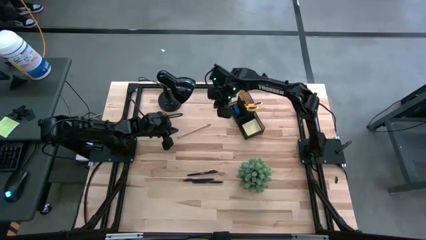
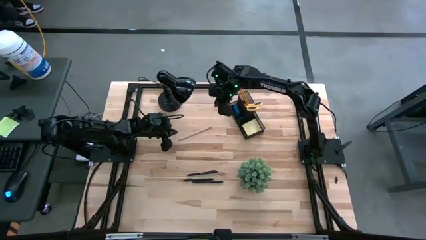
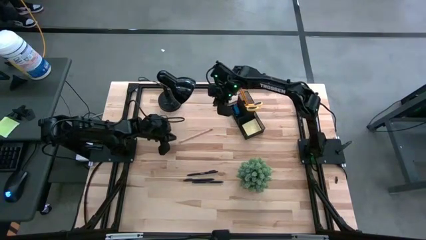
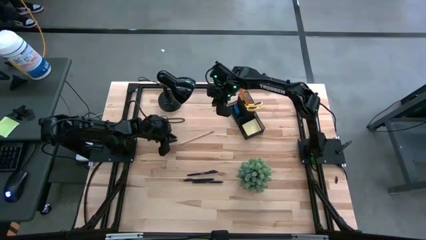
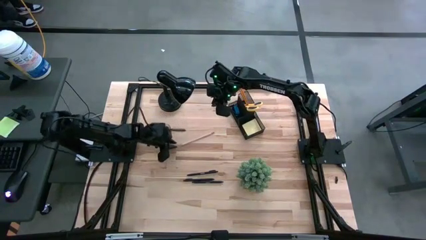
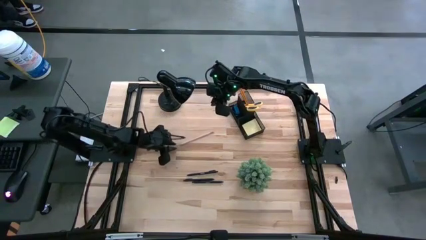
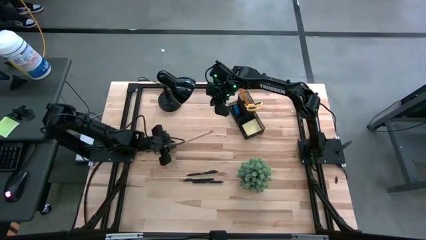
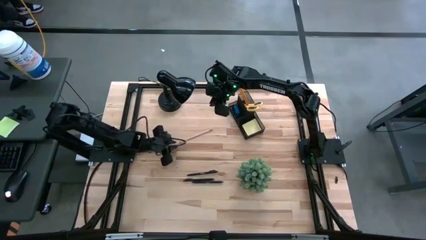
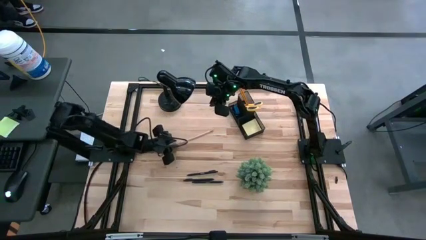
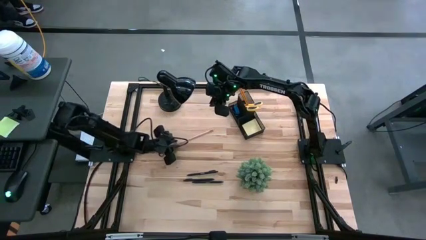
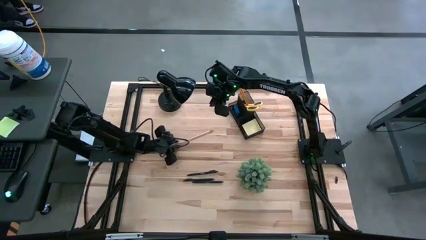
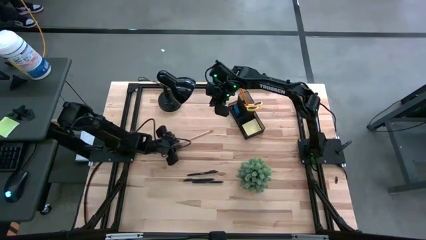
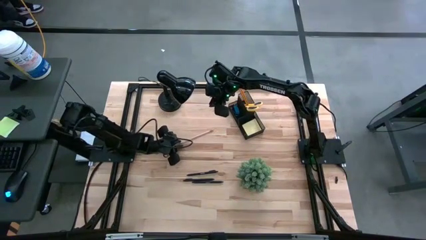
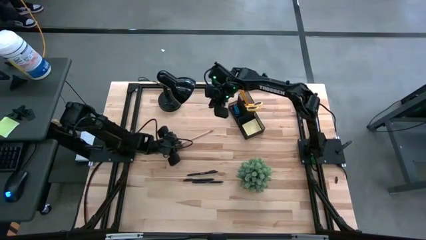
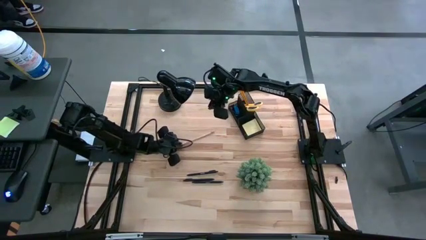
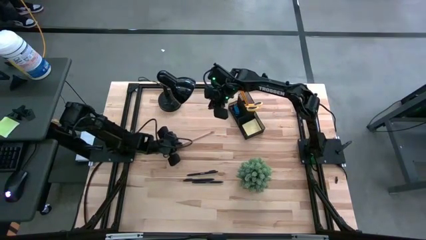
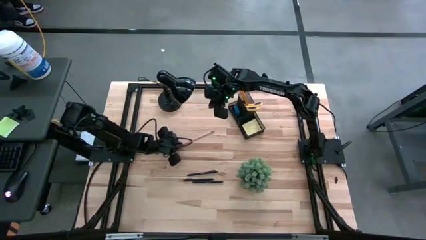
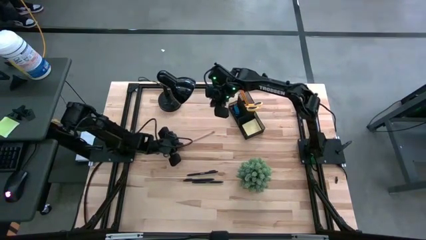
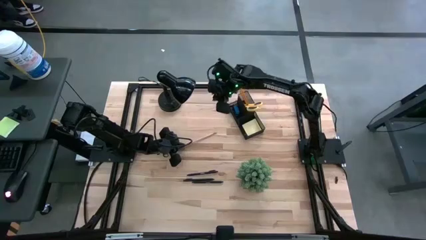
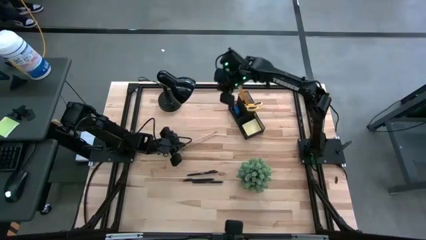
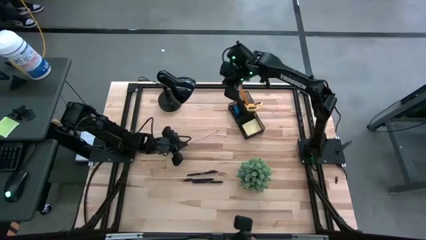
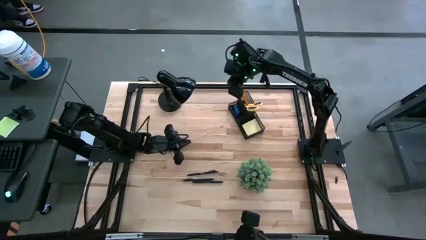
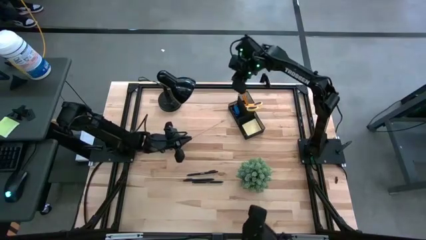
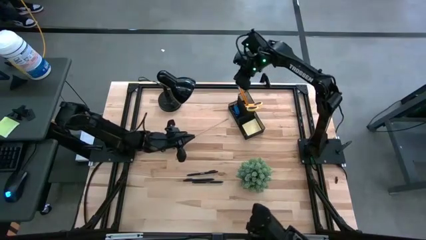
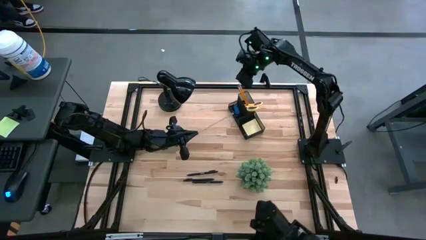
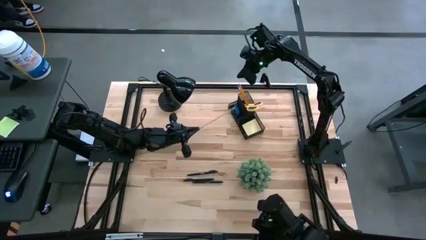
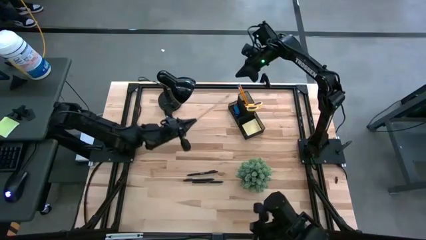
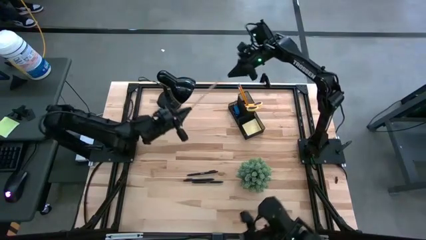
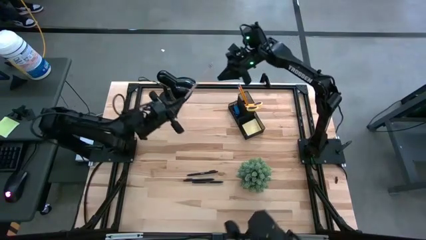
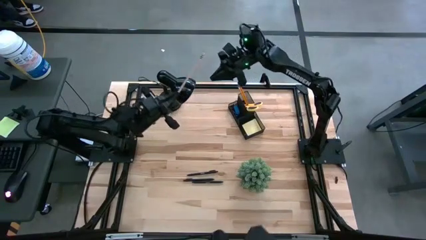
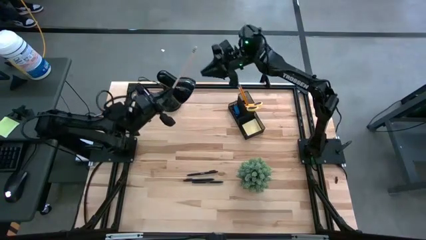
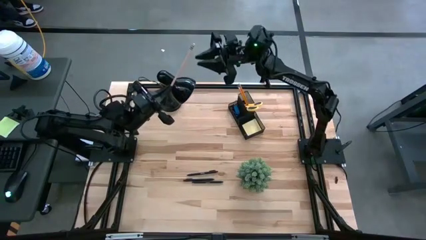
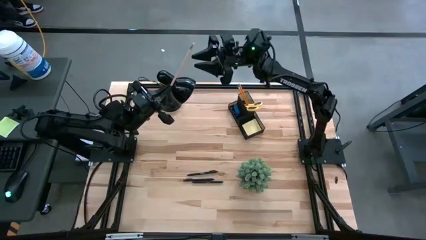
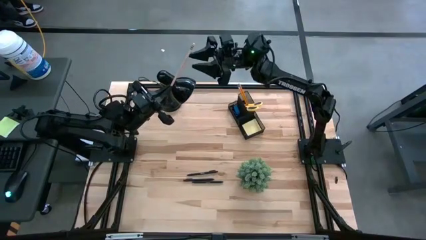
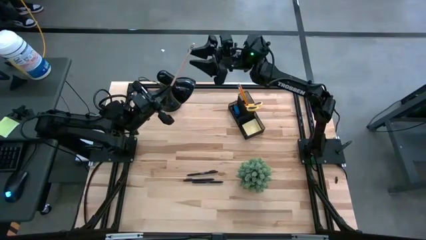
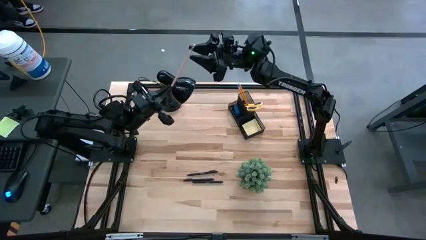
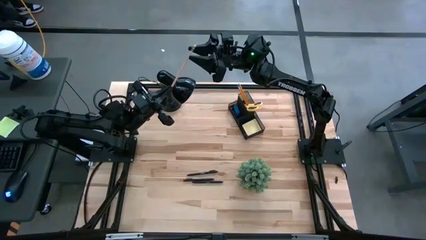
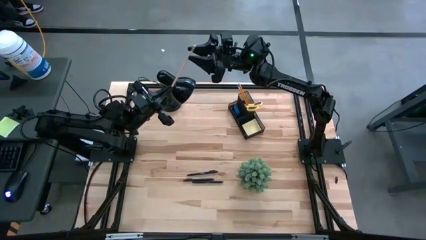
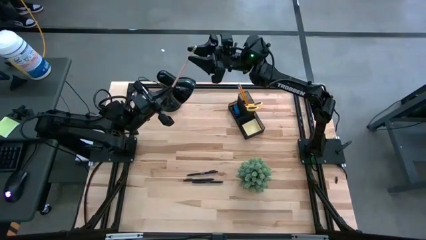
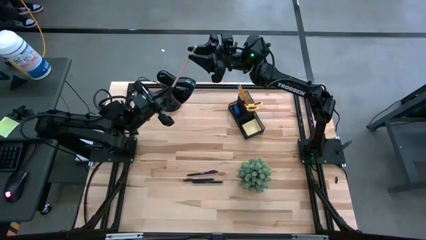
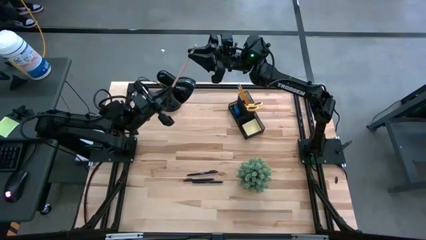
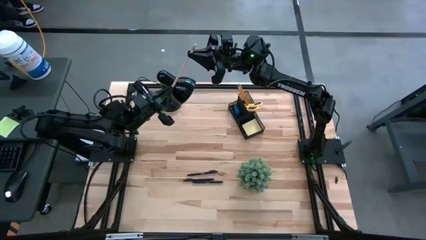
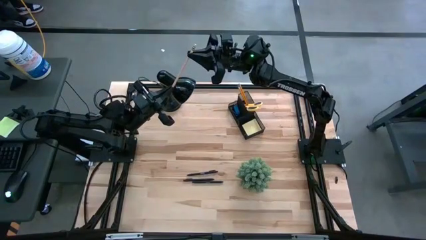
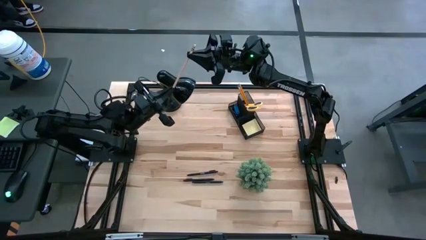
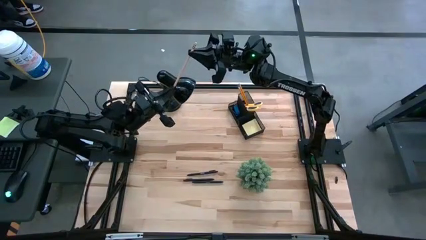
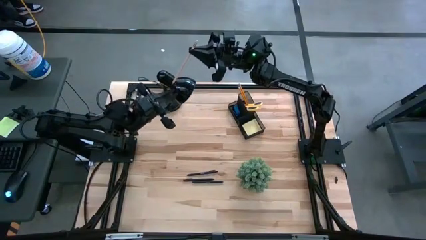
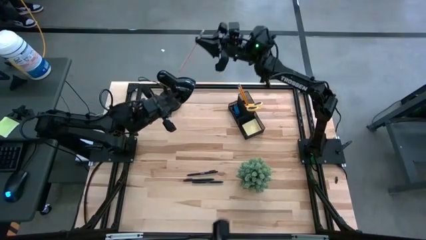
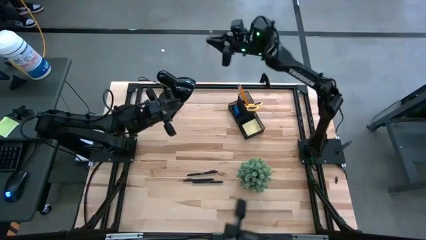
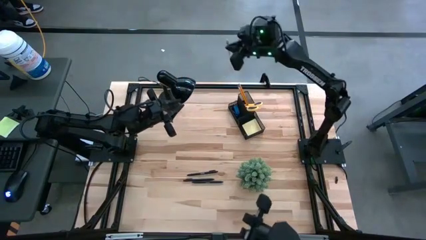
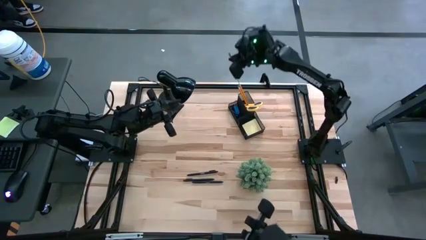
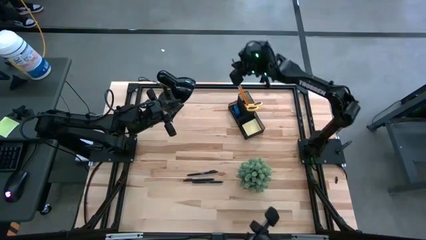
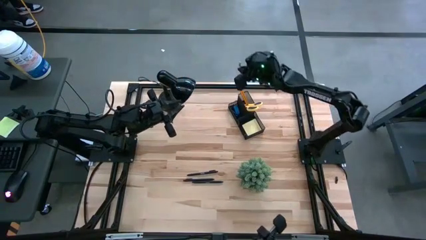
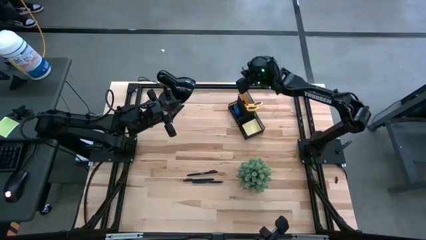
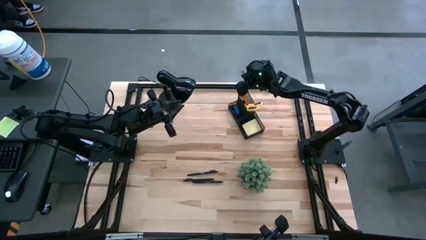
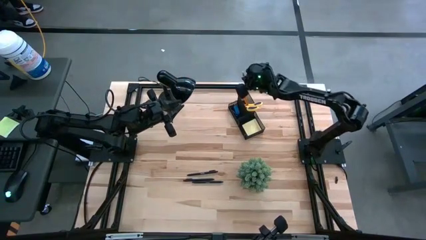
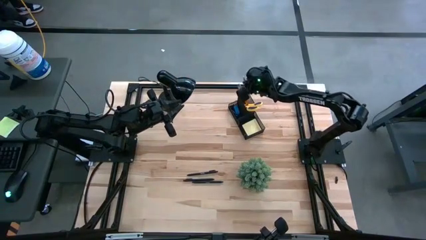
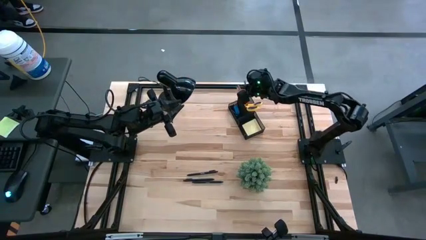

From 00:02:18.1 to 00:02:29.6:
Task: Pick and place office supplies into organizer
Put the white pencil into the desk organizer

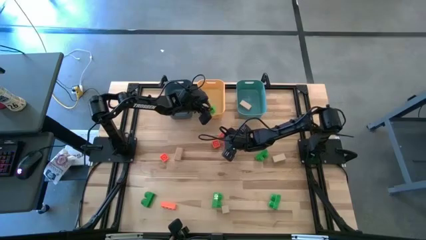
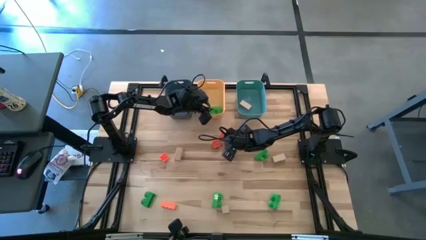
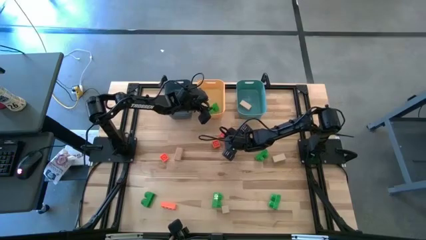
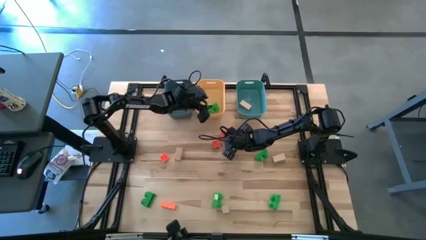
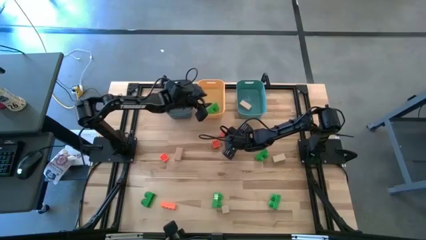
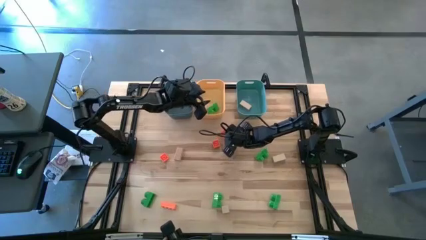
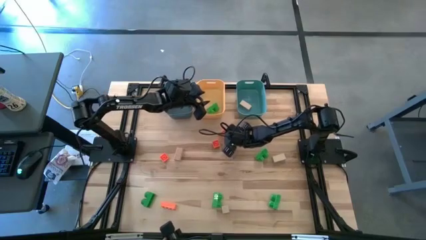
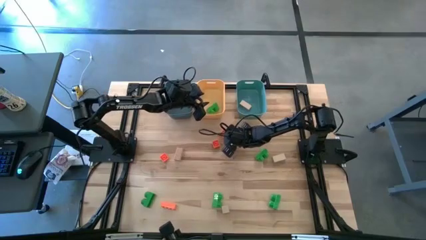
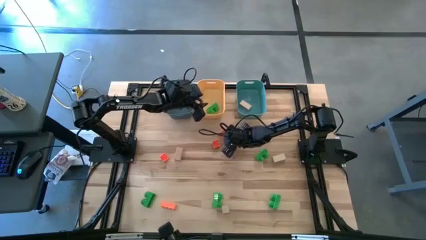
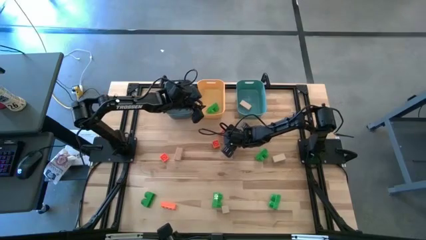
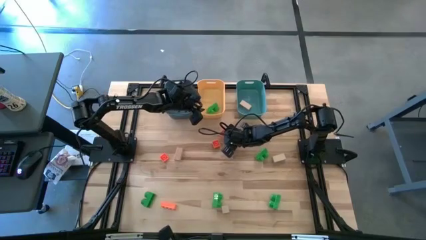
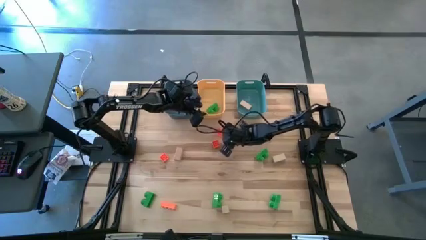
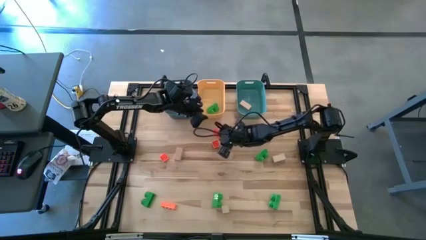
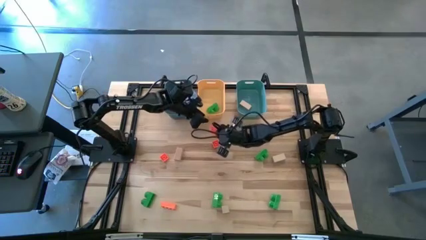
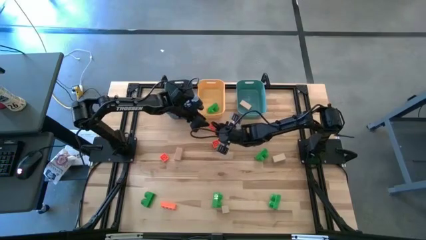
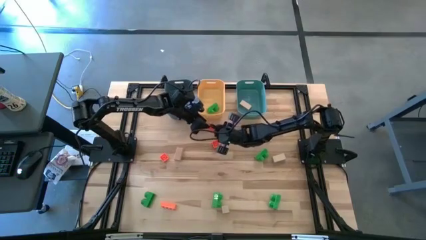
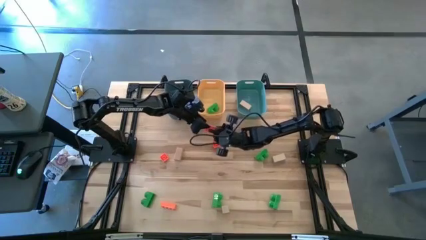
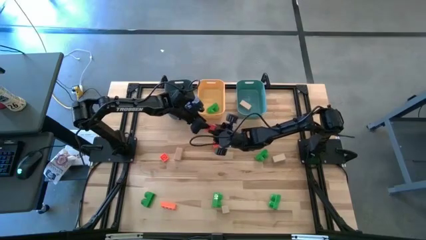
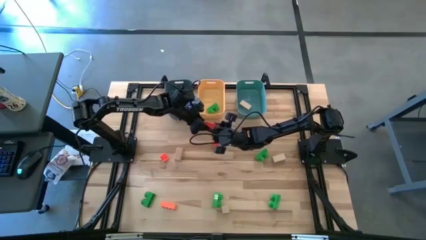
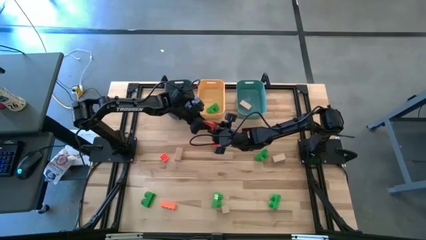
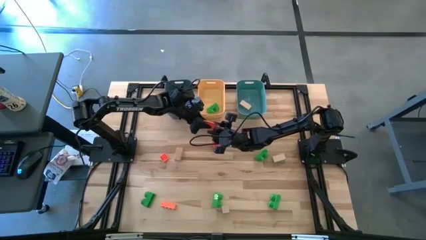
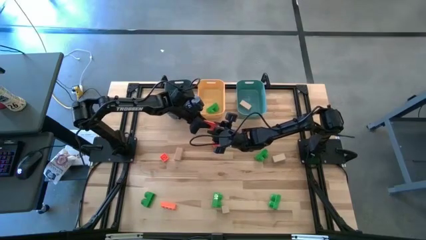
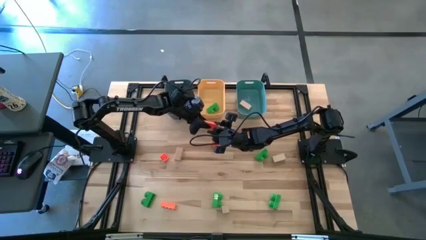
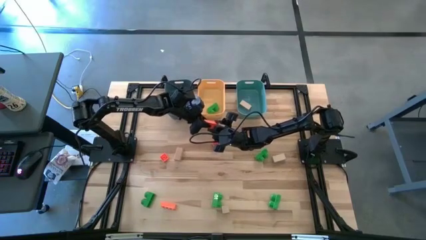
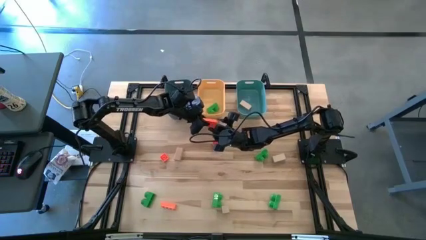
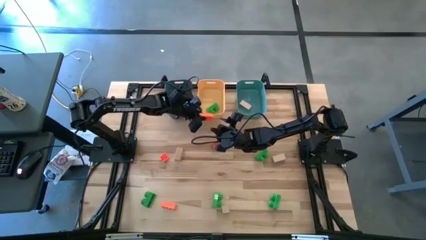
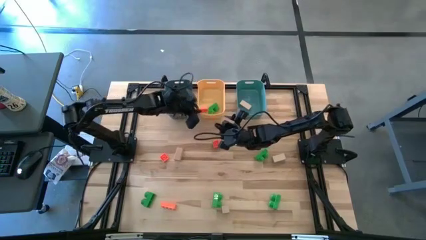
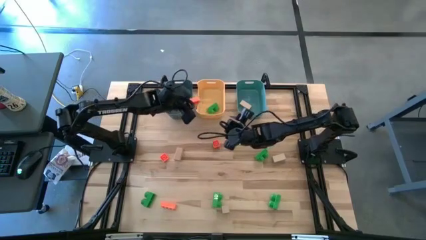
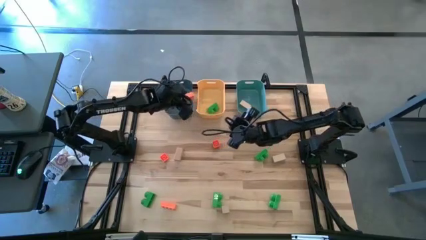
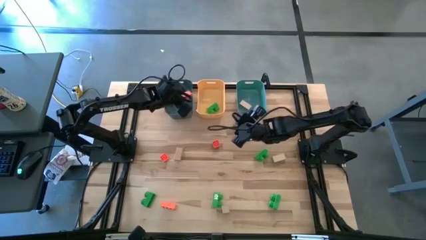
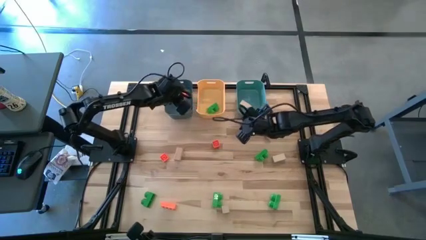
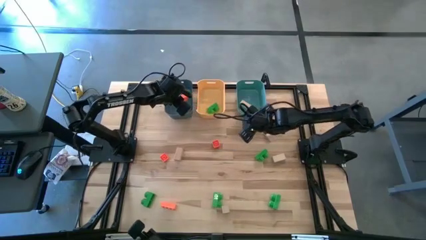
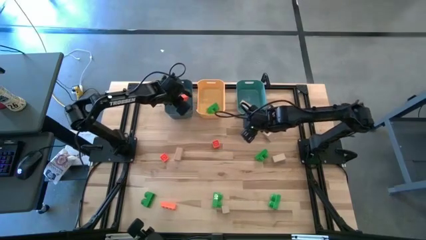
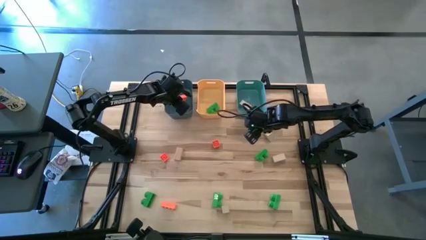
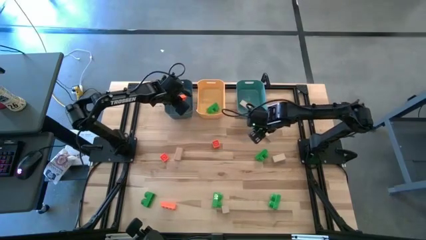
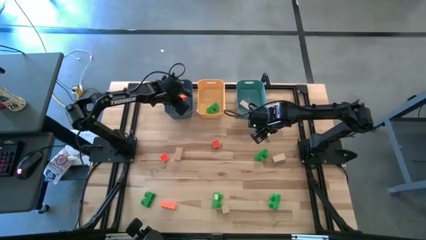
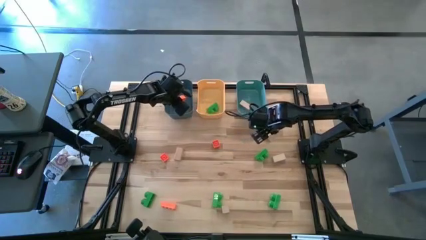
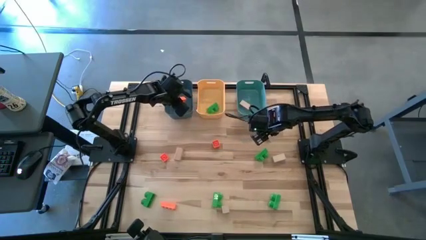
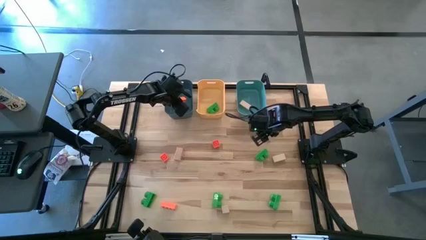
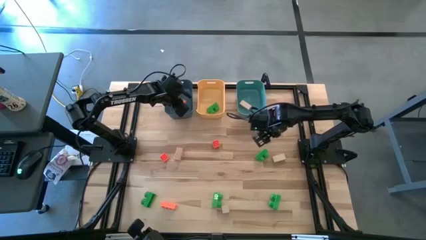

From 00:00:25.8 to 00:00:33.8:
Task: Sort & place blocks by color
Put the orange game piece into the blue bin
